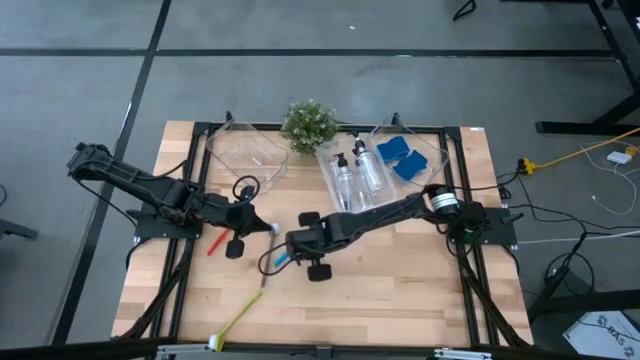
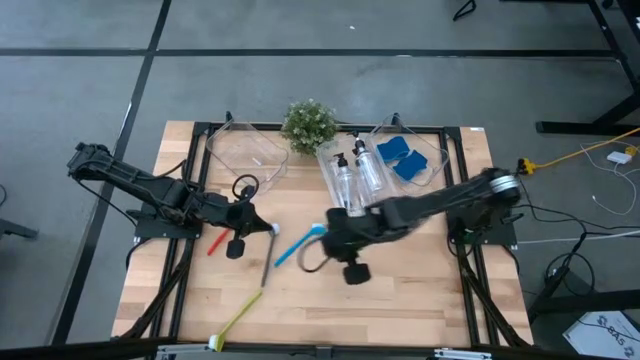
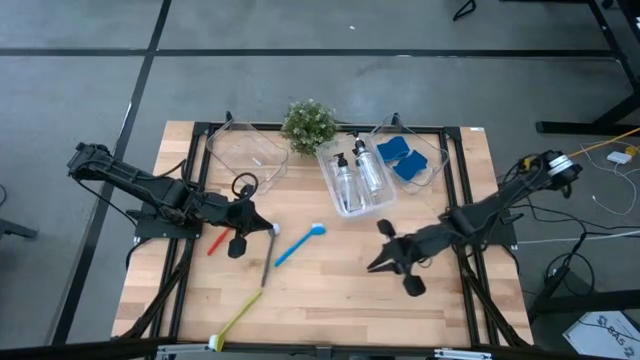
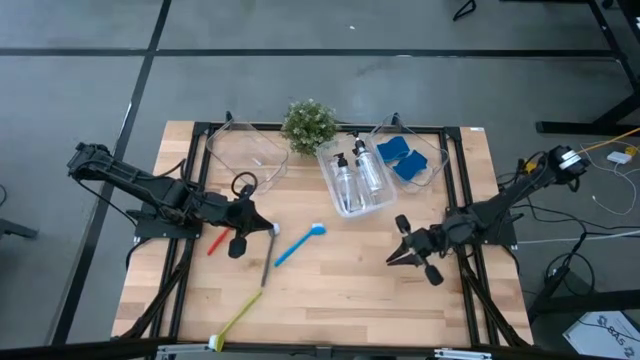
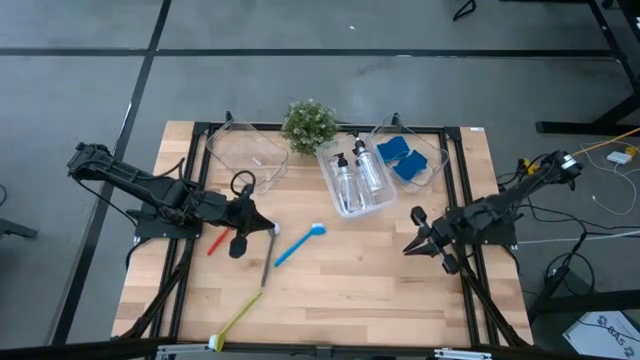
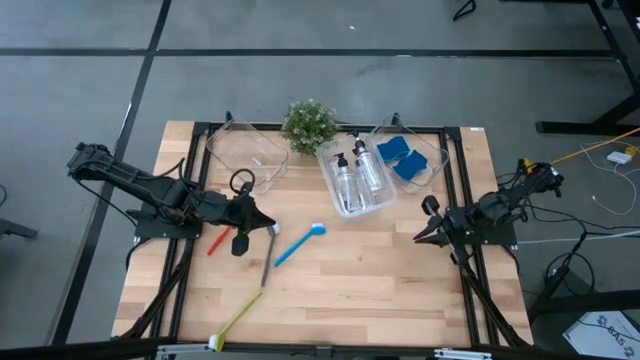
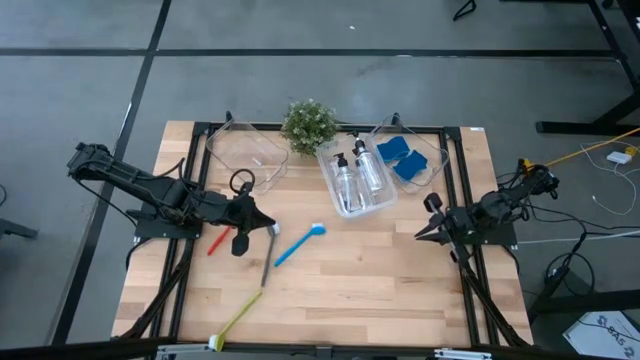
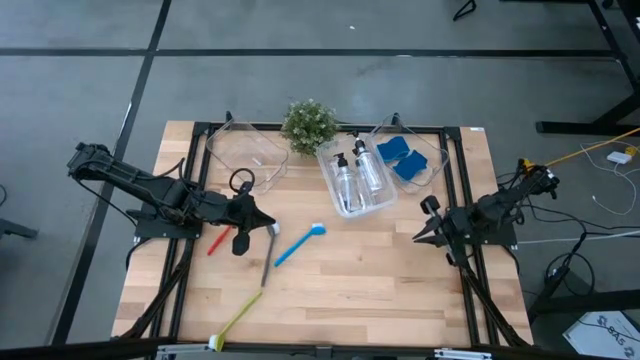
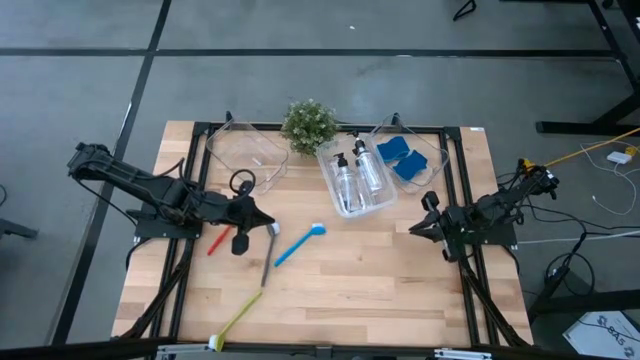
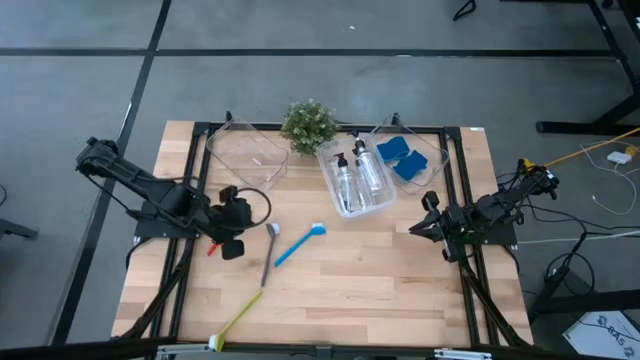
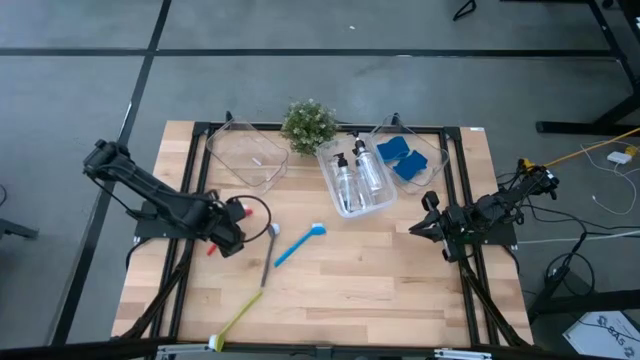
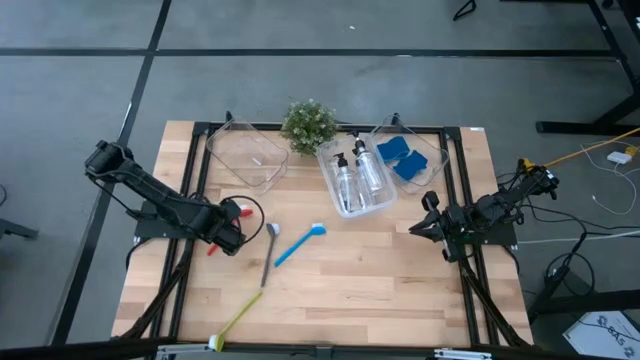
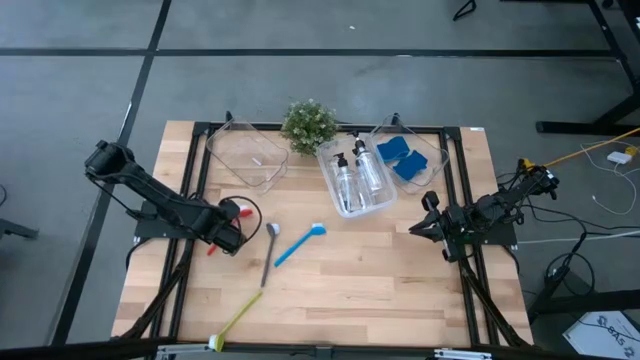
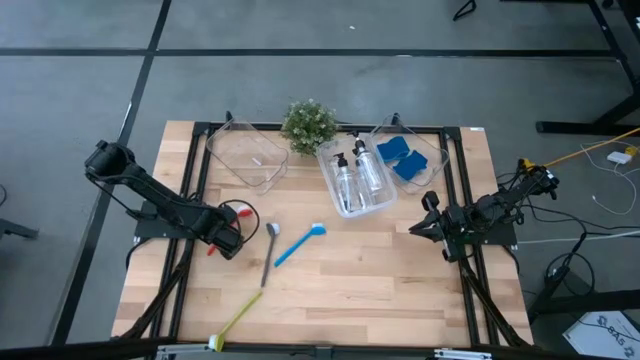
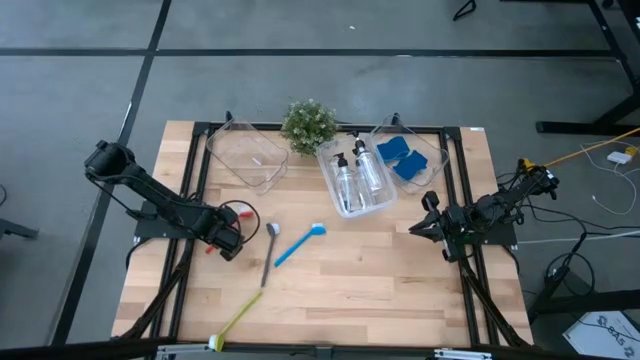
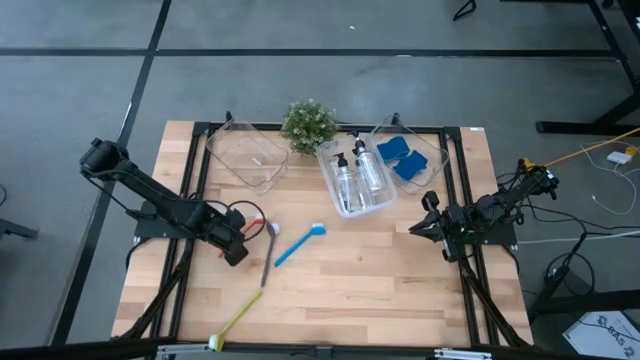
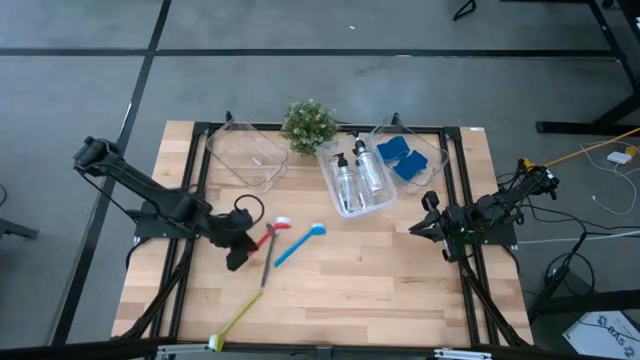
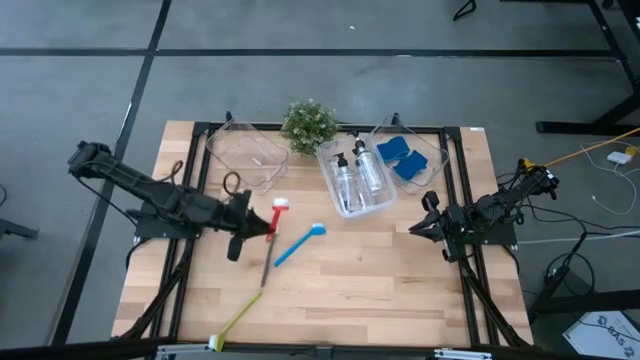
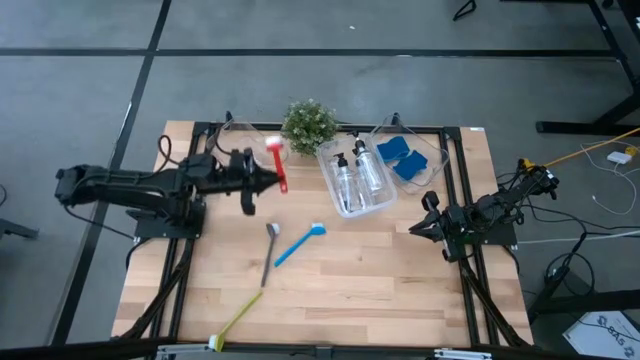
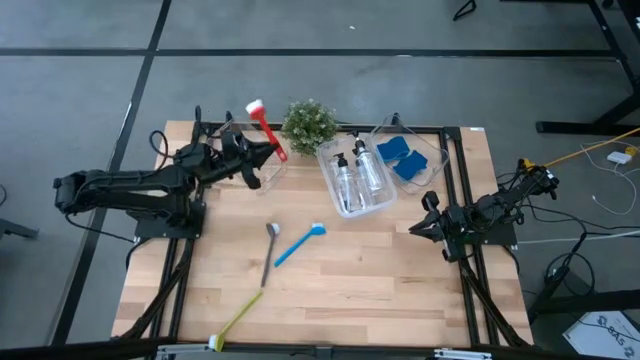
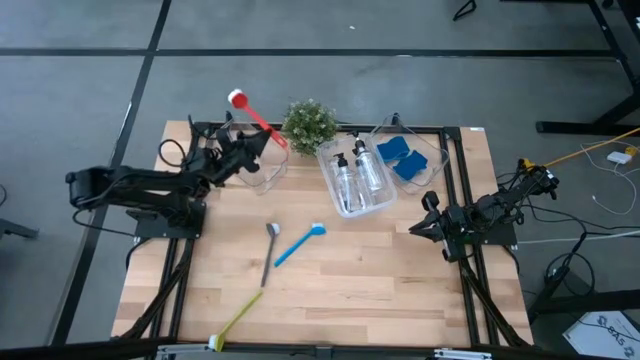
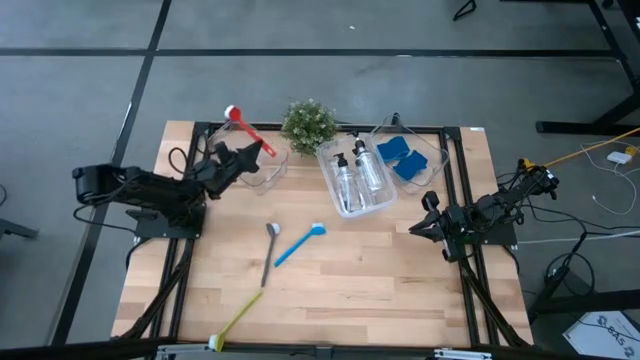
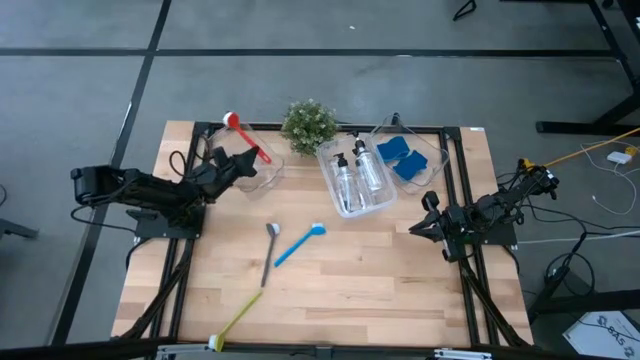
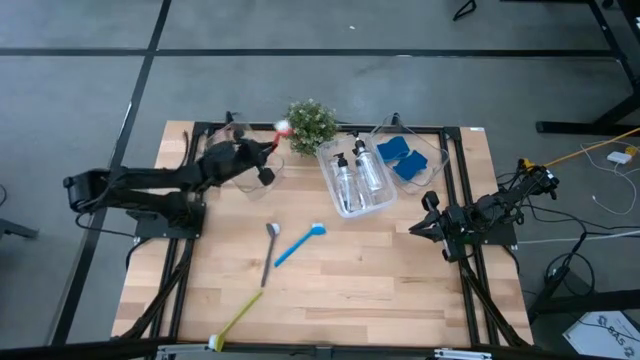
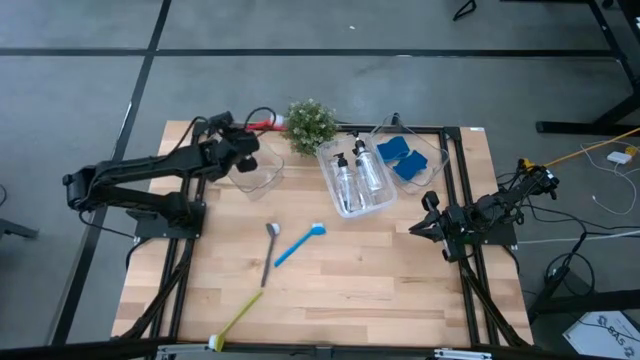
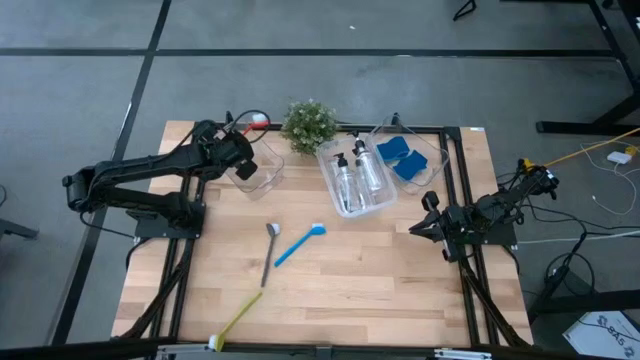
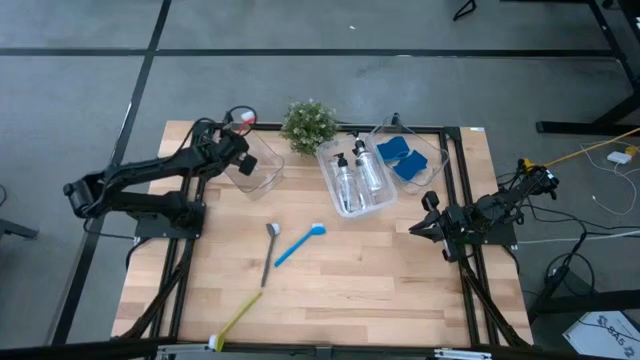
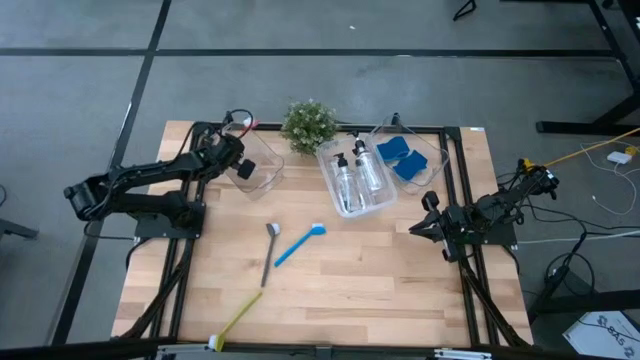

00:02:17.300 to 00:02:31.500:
Task: Pick & Place Kitchen Sink Supplies
Put the red dish brush into the left transparent bin

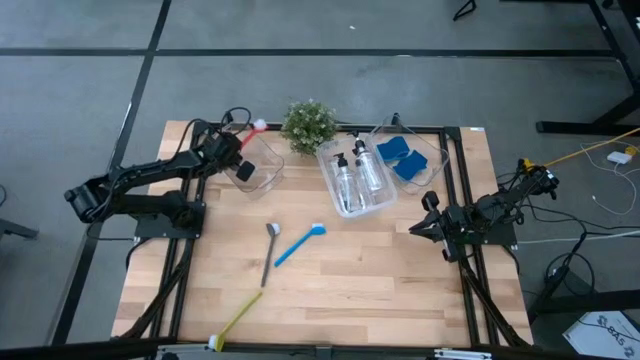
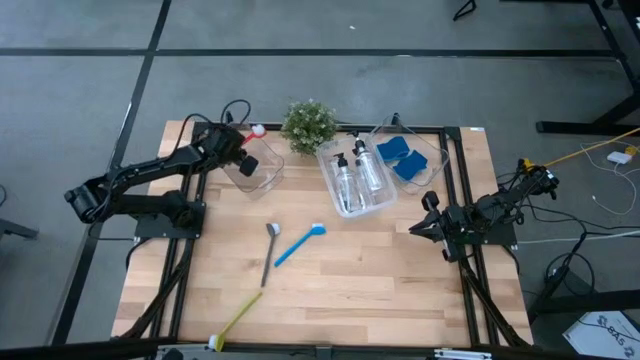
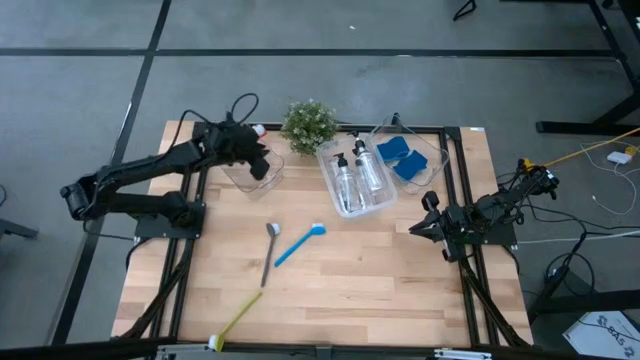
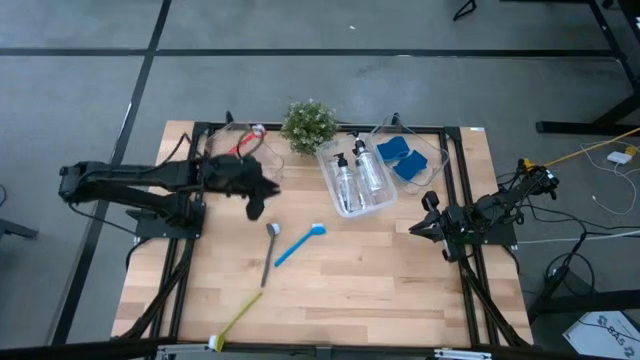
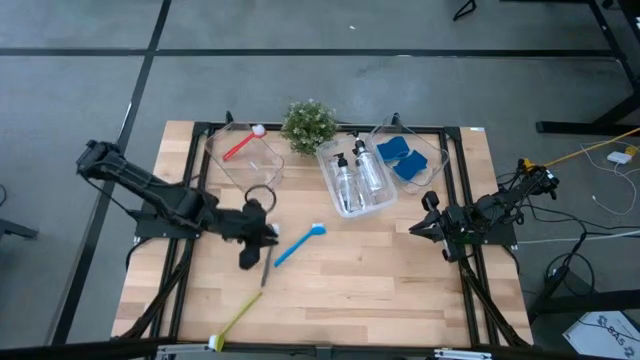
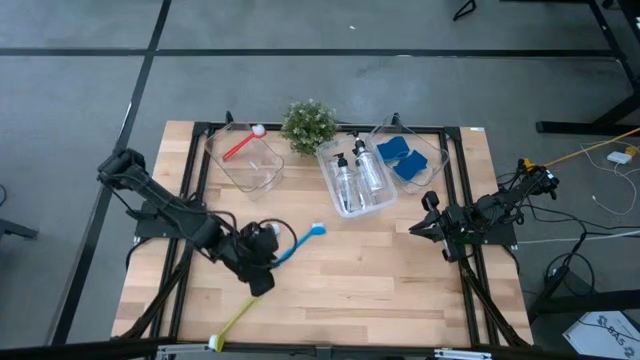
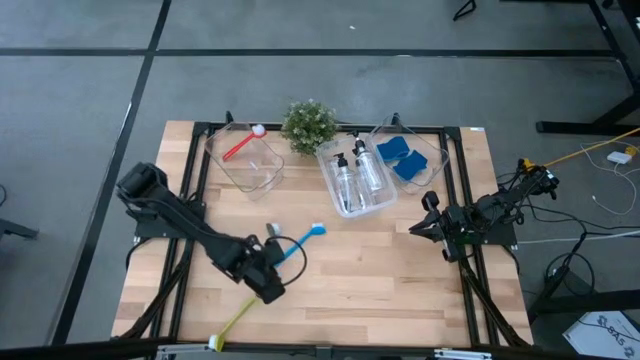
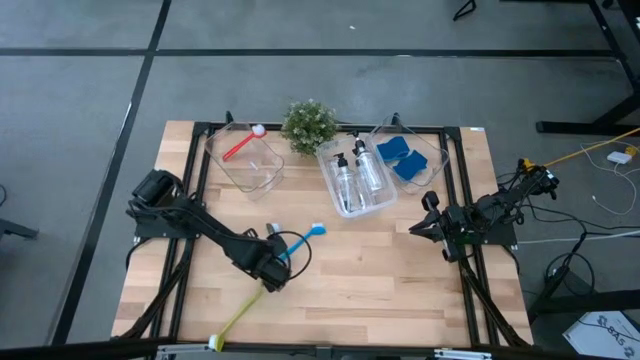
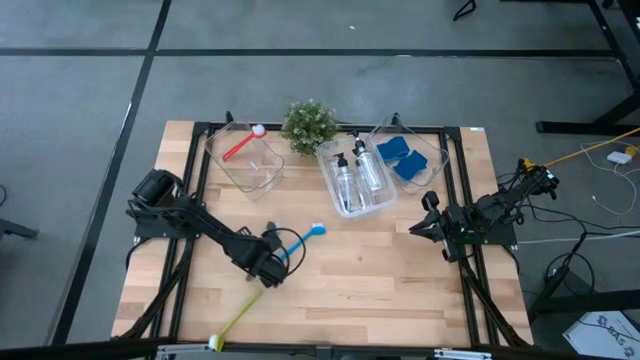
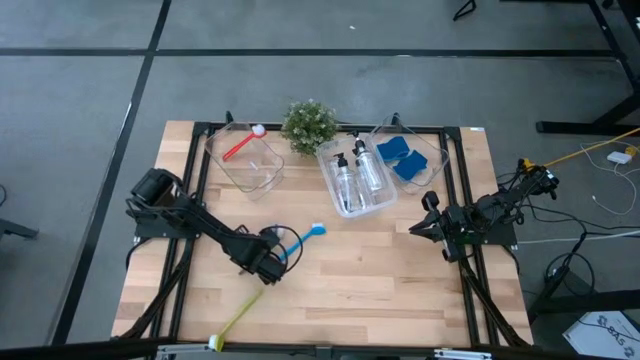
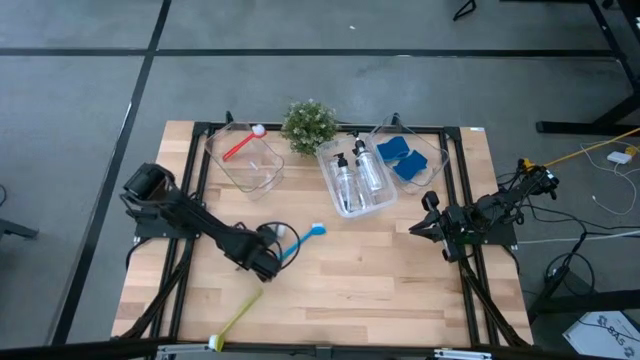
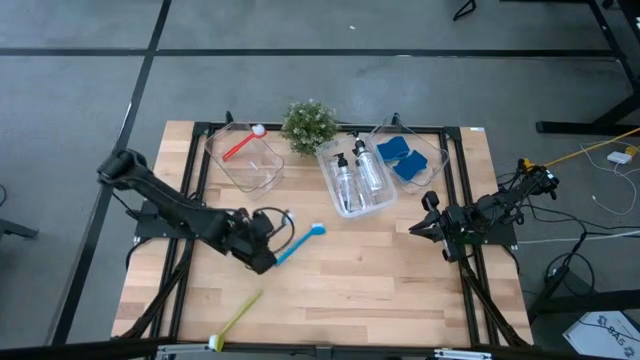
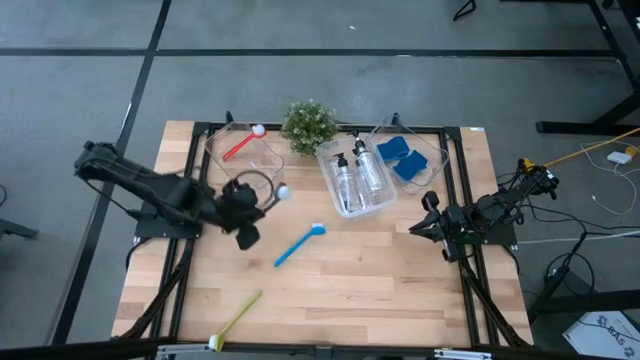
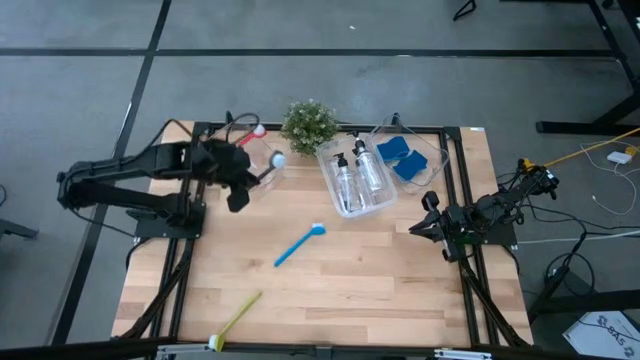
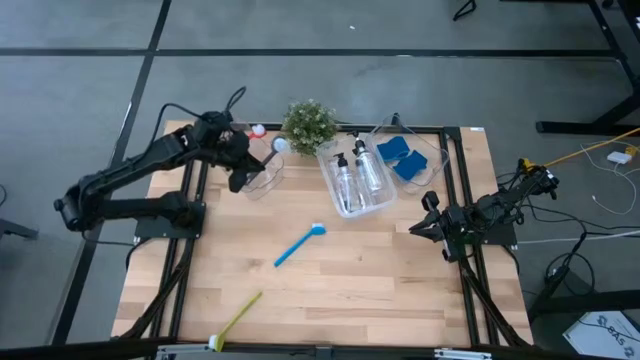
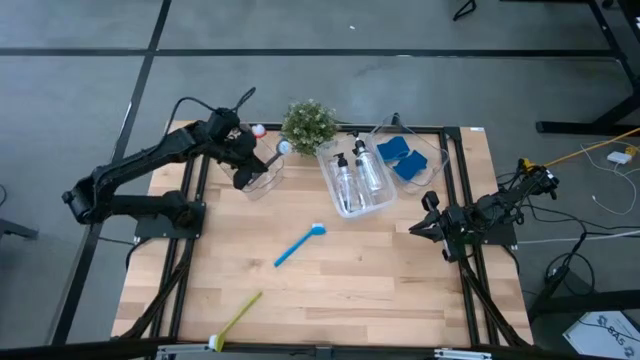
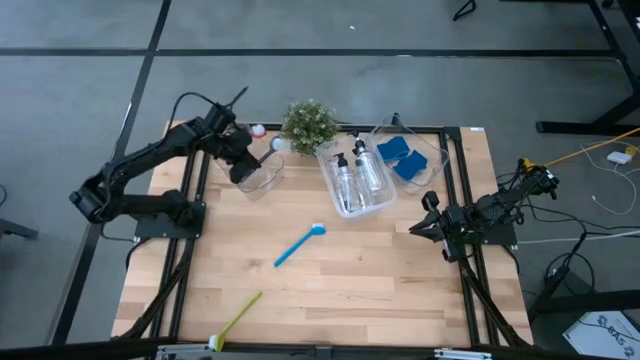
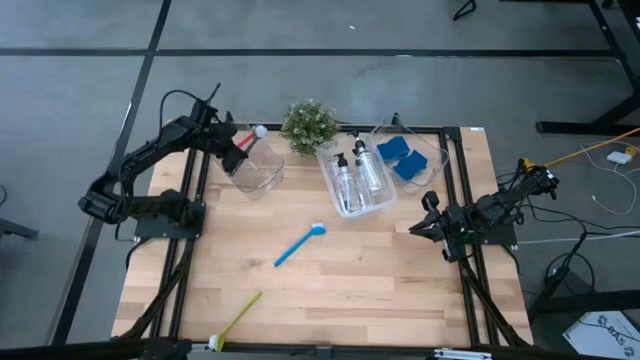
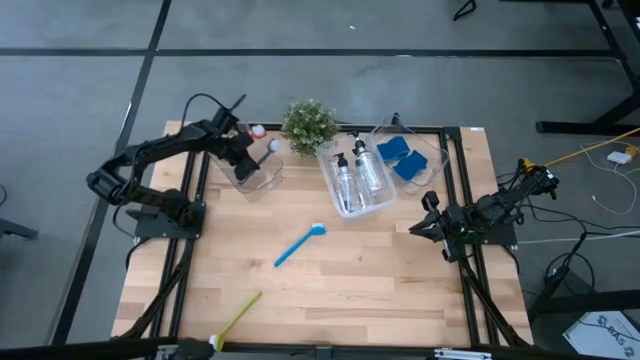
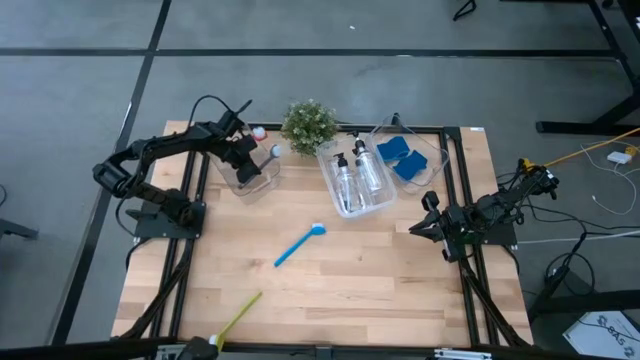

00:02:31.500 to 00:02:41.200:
Put the gray dish brush into the left transparent bin
